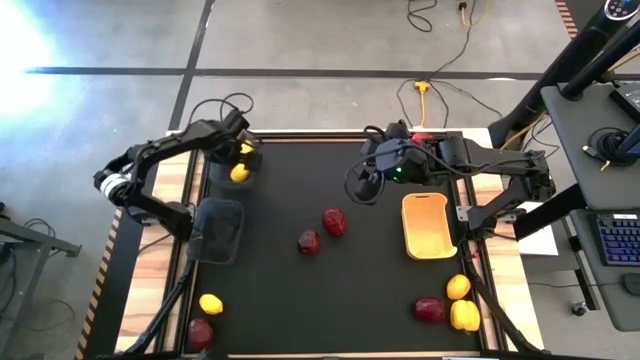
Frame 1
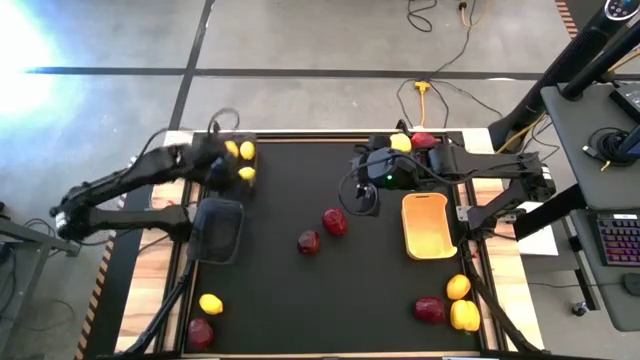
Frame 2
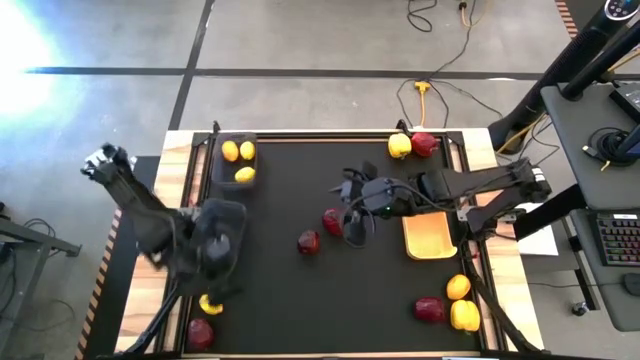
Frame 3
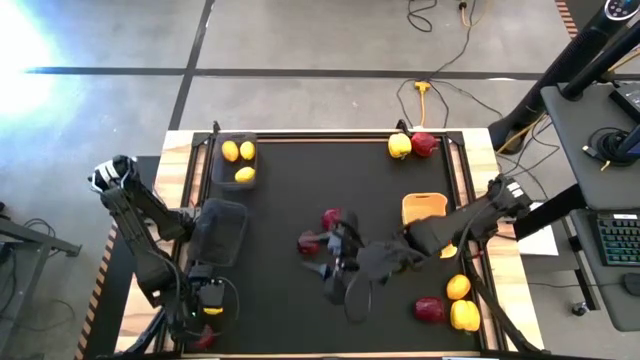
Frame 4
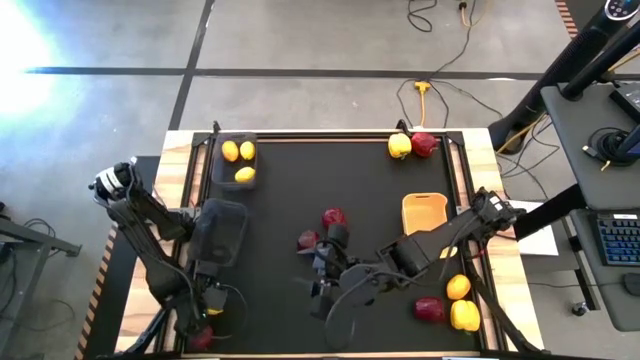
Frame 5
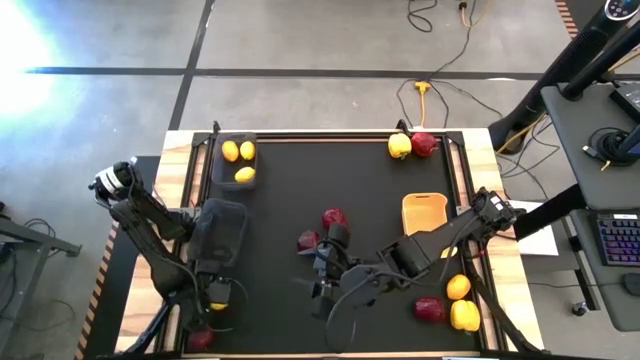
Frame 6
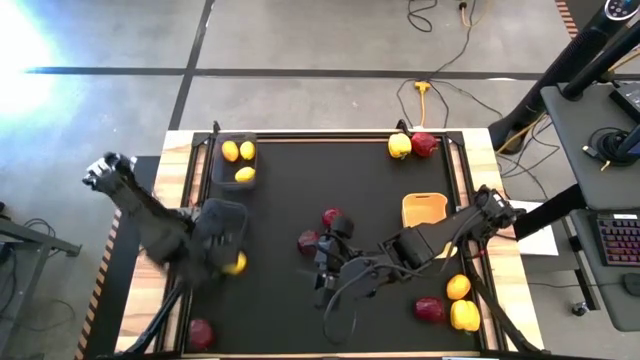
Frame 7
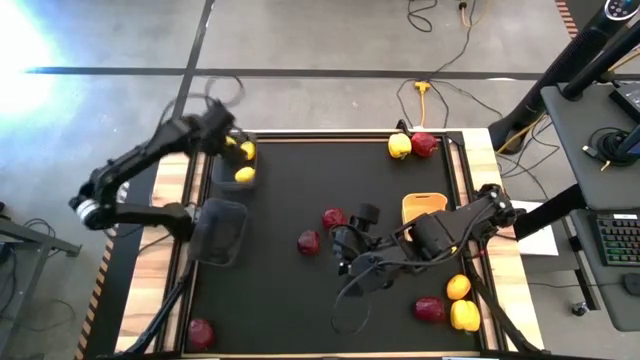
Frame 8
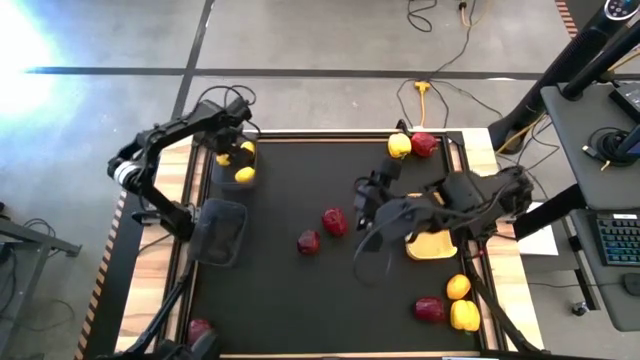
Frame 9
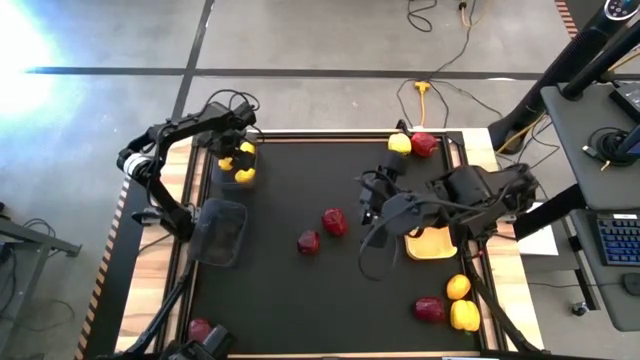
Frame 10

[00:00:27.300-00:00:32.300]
Task: Sort produce into baskets
Put the yellow lemon into the top black bin

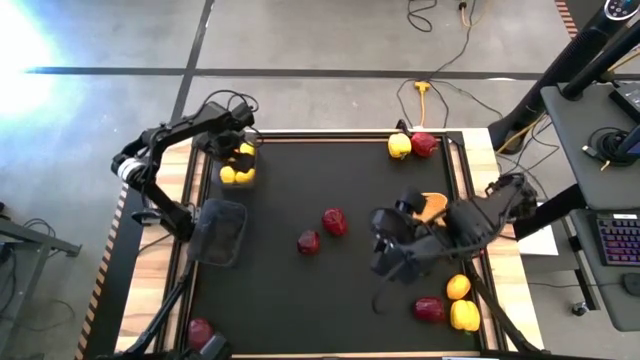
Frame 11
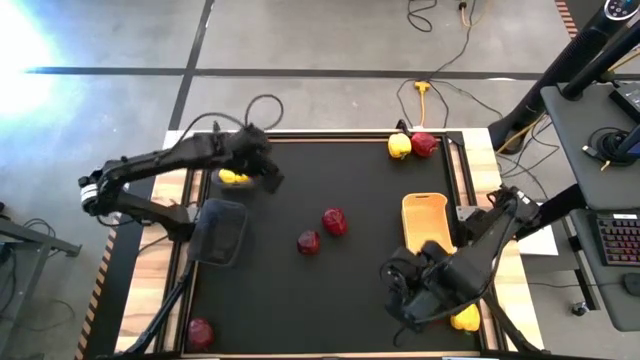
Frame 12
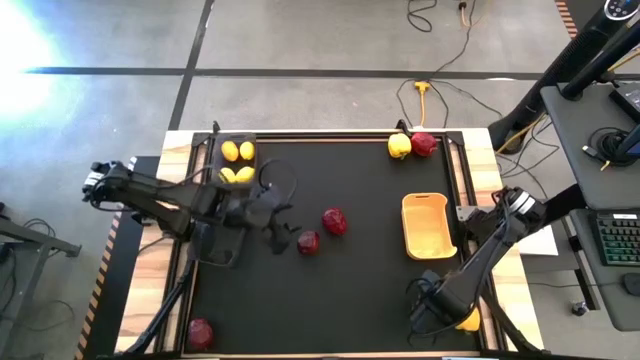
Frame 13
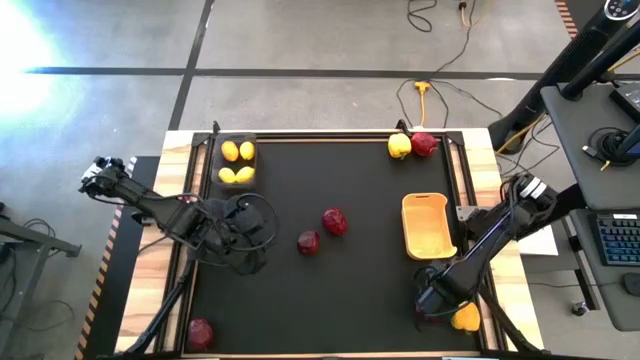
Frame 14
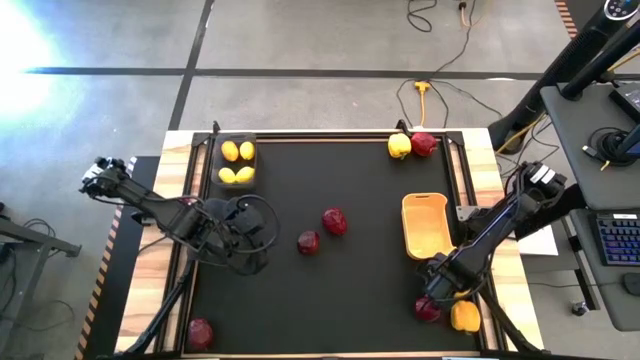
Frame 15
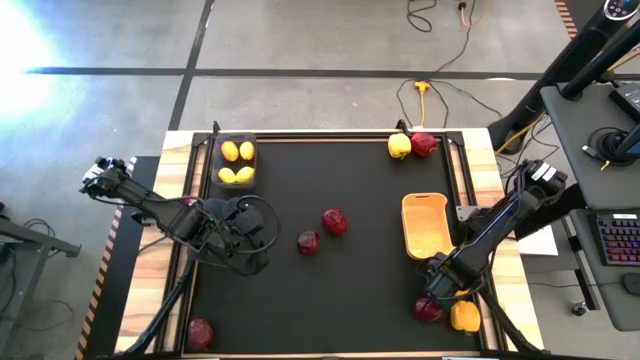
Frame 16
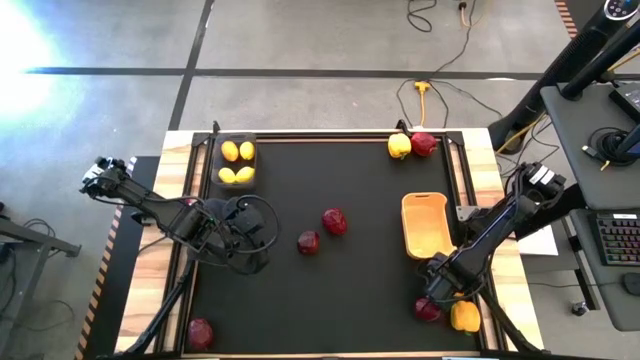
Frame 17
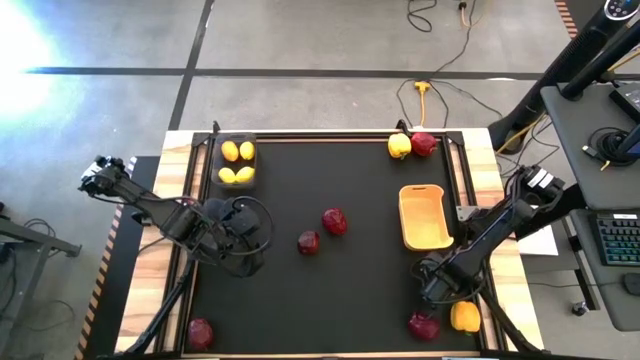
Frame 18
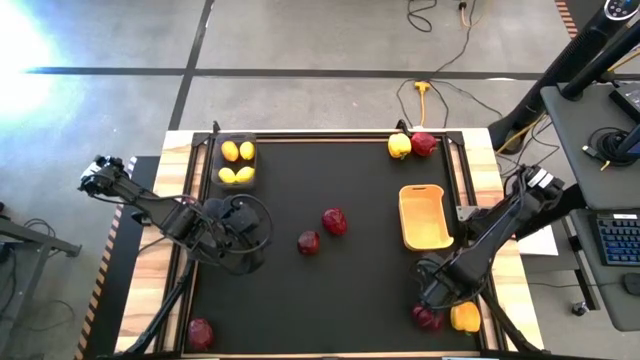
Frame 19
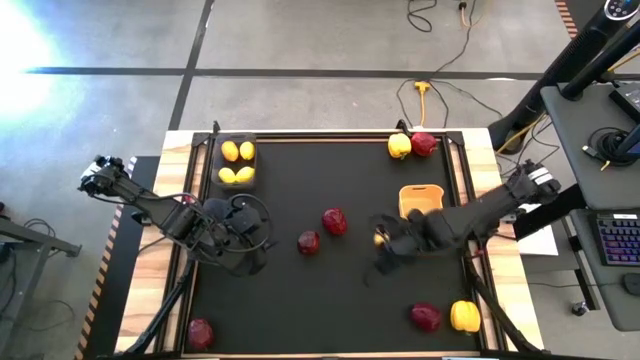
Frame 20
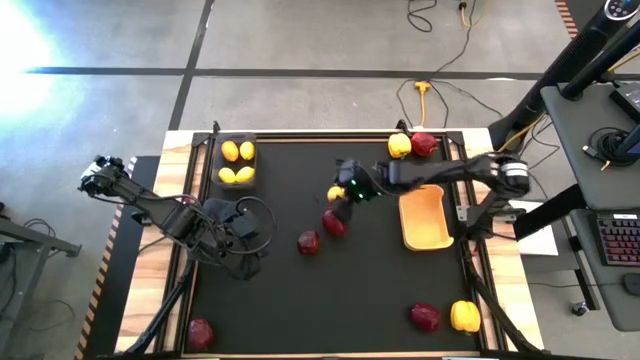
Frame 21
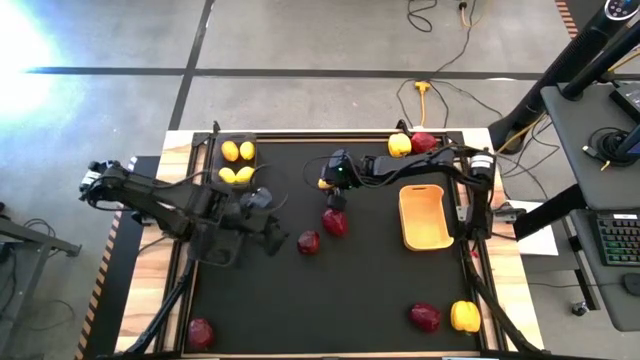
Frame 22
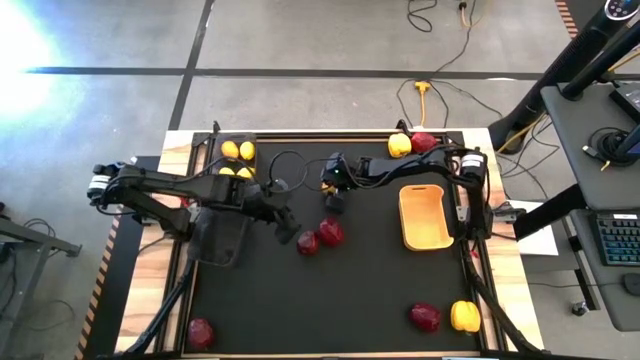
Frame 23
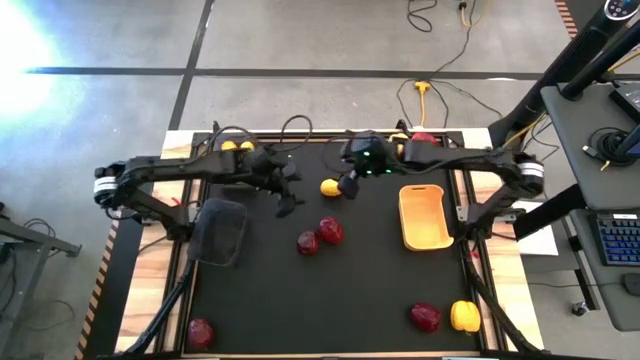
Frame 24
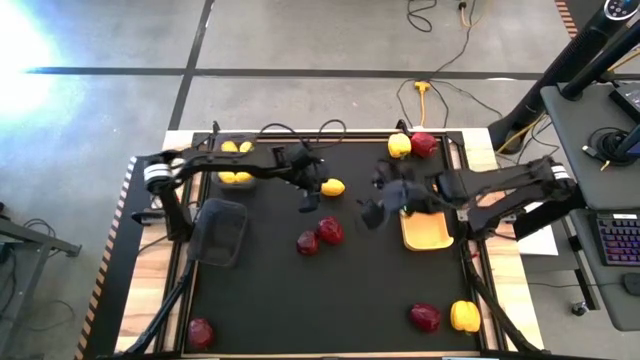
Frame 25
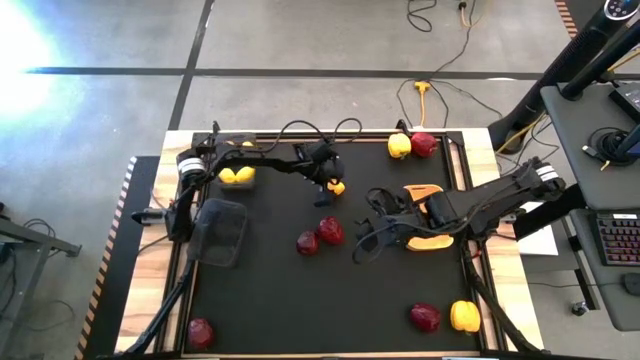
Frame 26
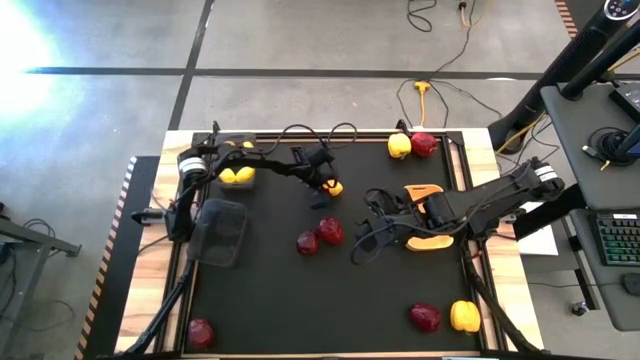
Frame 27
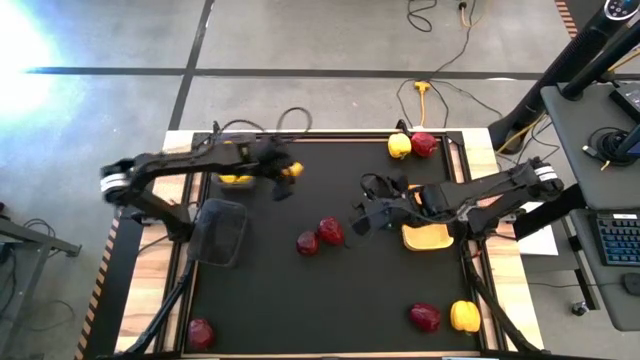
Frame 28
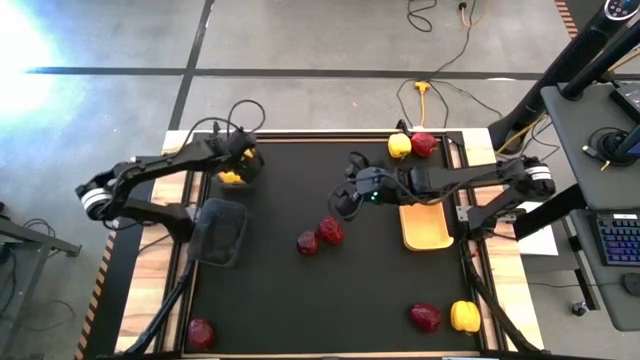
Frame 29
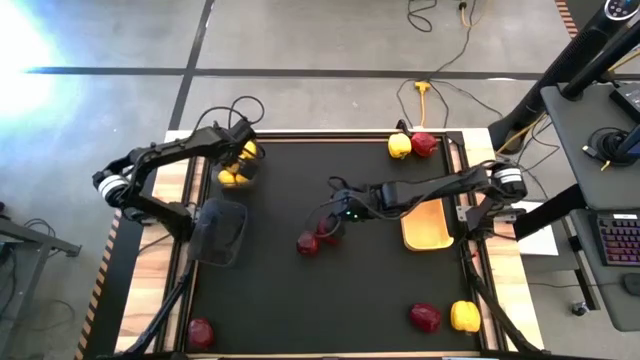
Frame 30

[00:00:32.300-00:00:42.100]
Put the yellow lemon into the top black bin

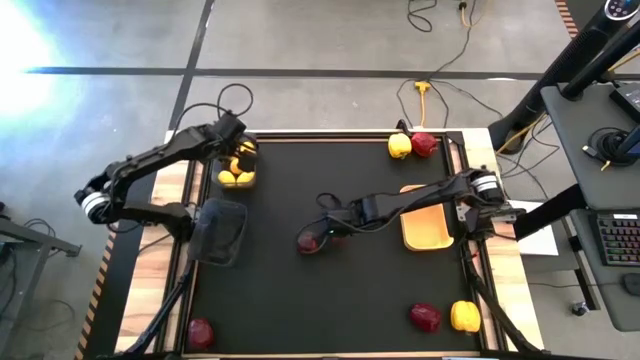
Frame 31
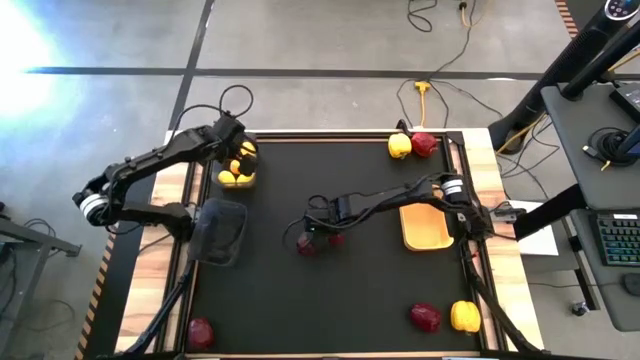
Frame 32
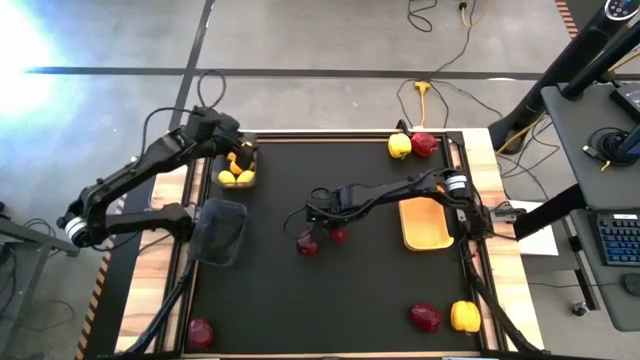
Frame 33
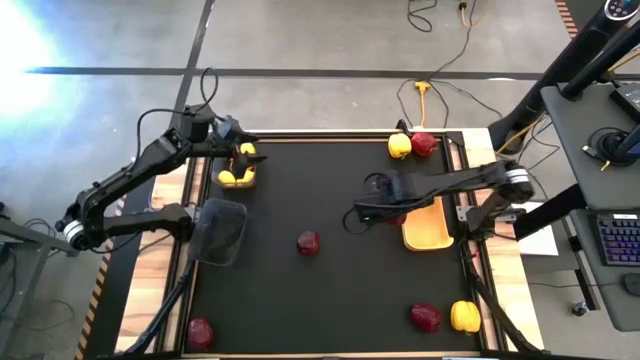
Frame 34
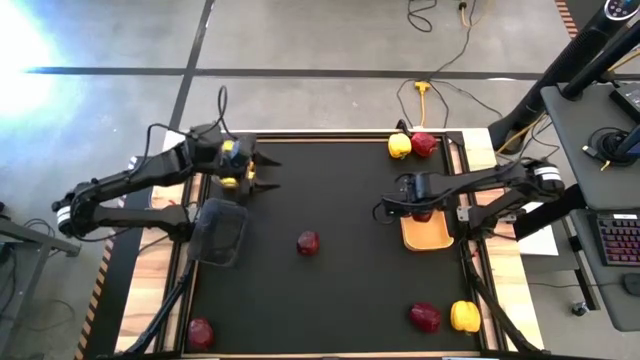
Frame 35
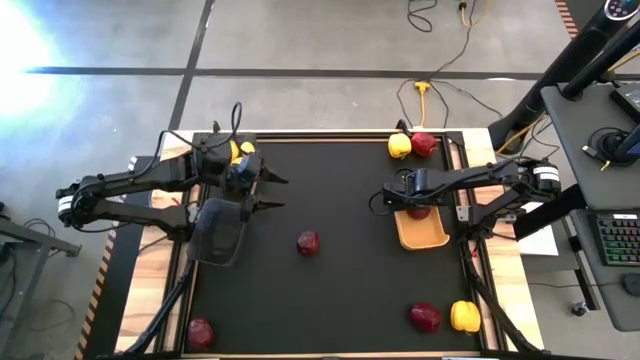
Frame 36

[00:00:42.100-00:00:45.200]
Put the red apple into the yellow bin

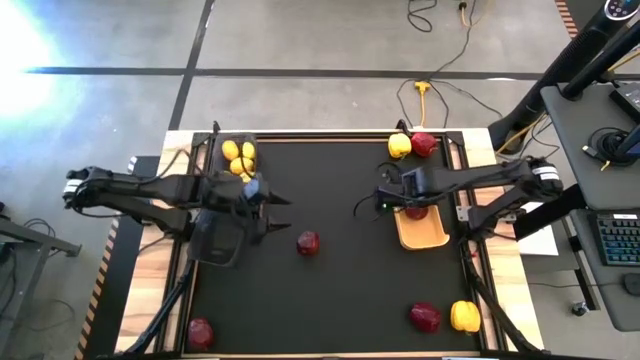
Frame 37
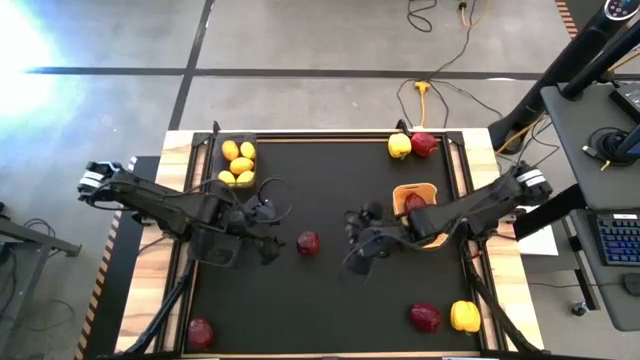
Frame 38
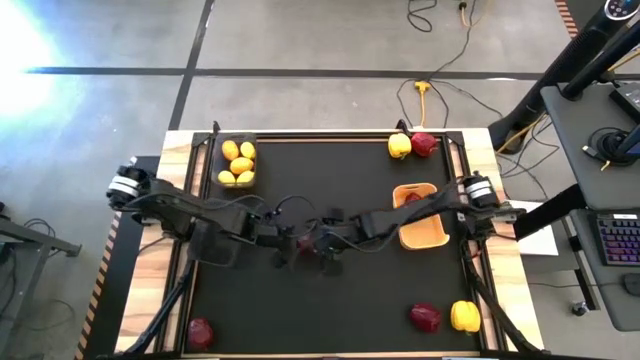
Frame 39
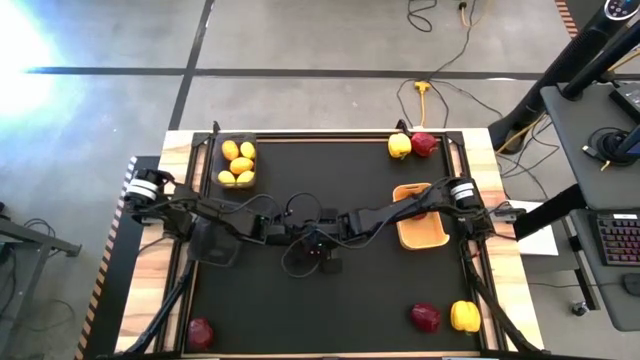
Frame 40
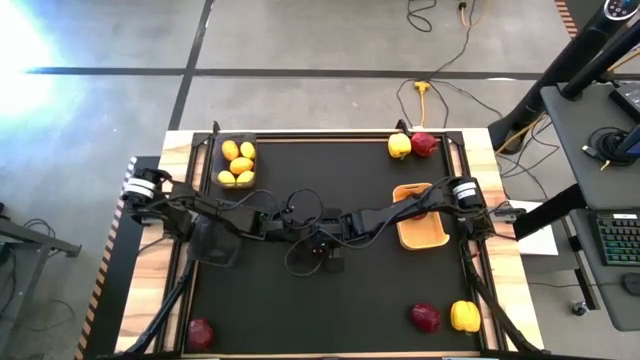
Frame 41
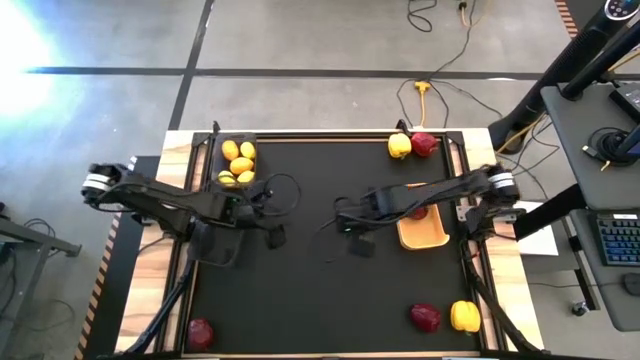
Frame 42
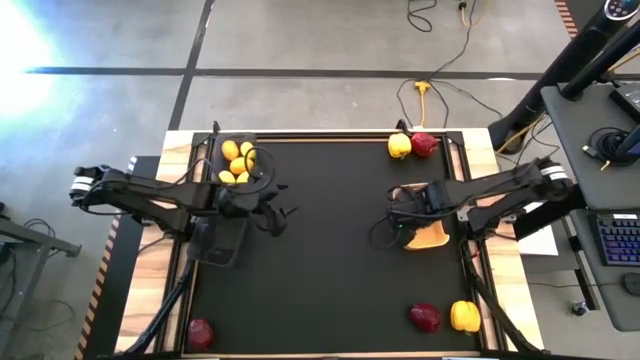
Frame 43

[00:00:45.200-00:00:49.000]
Put the red apple into the yellow bin

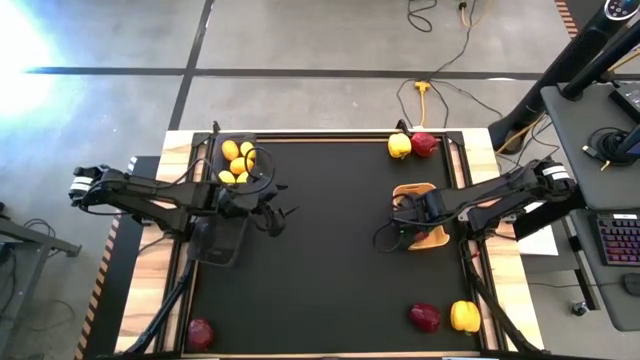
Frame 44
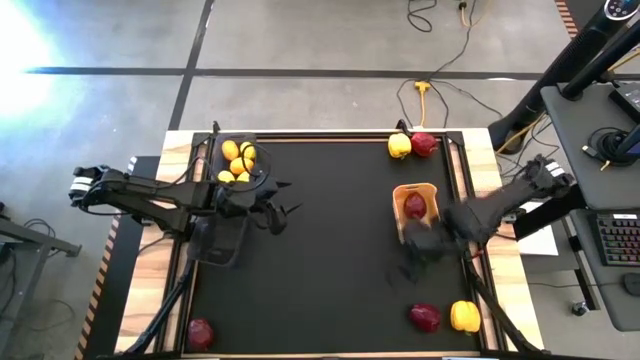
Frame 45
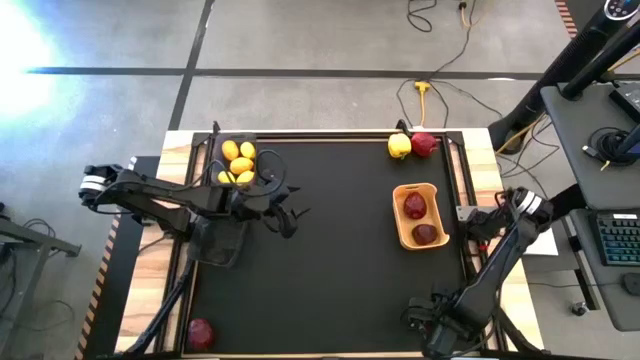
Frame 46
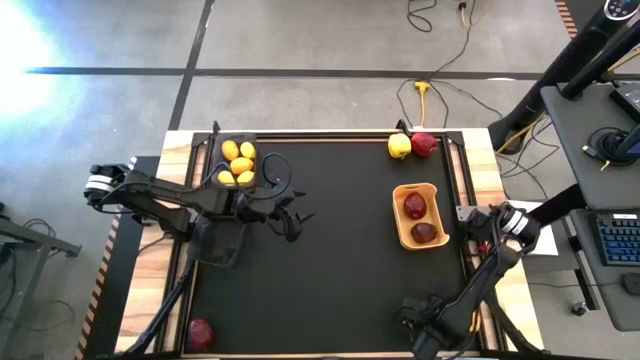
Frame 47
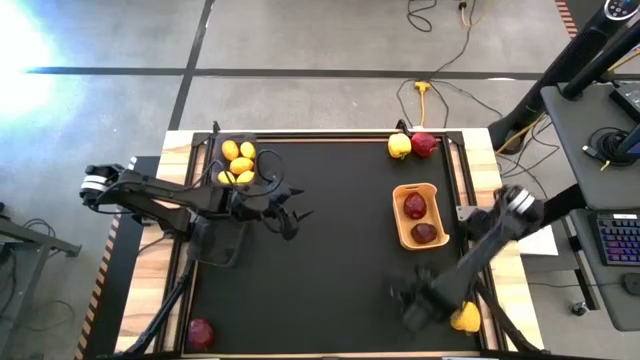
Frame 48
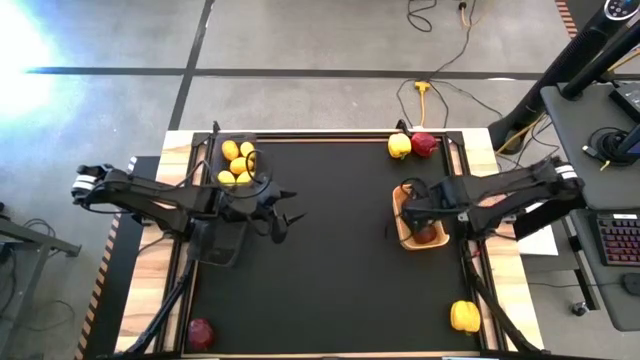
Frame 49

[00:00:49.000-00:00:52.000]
Put the red apple into the yellow bin
